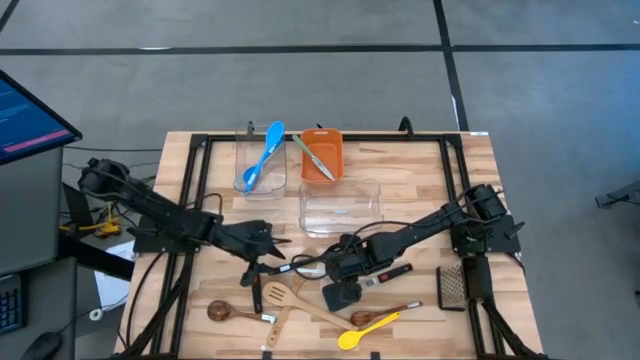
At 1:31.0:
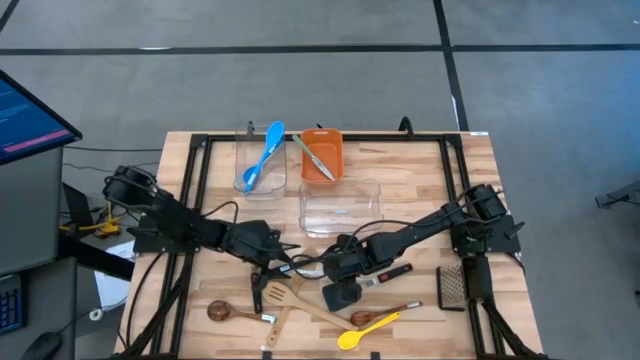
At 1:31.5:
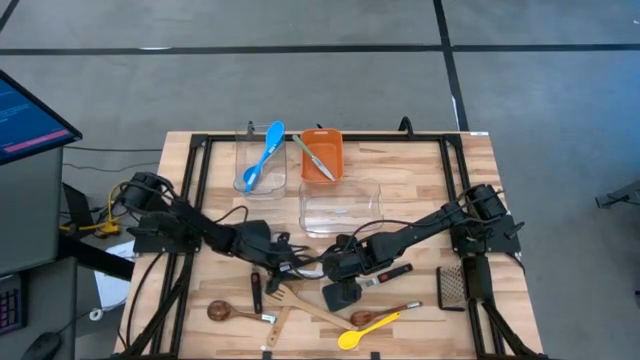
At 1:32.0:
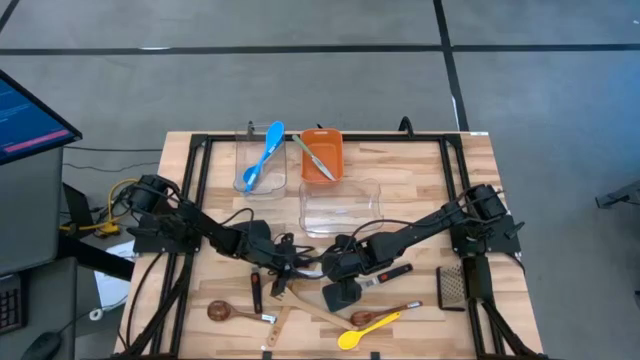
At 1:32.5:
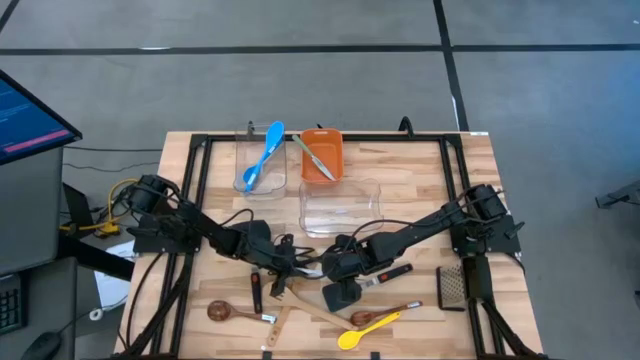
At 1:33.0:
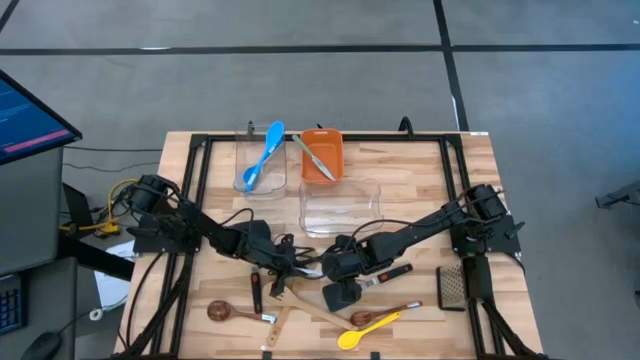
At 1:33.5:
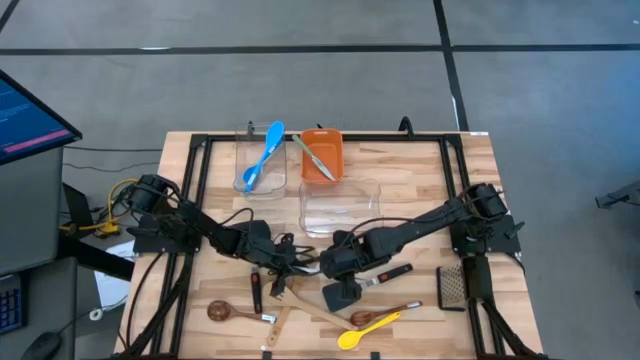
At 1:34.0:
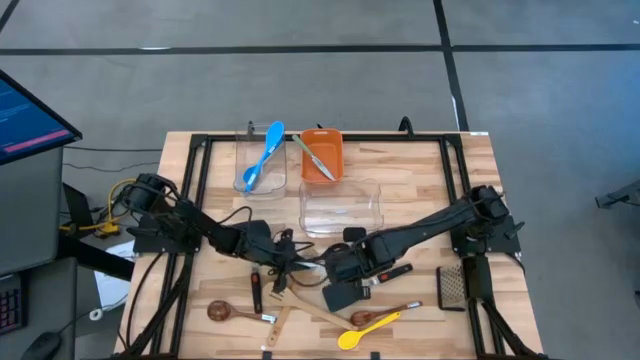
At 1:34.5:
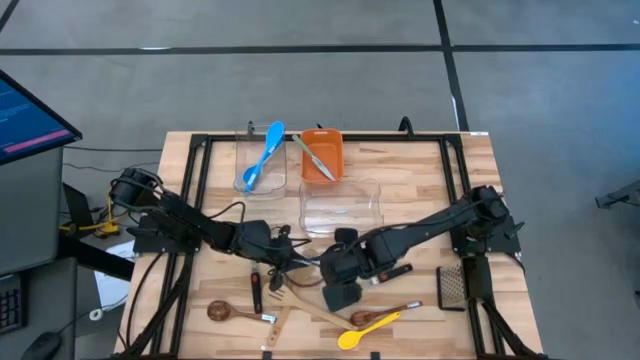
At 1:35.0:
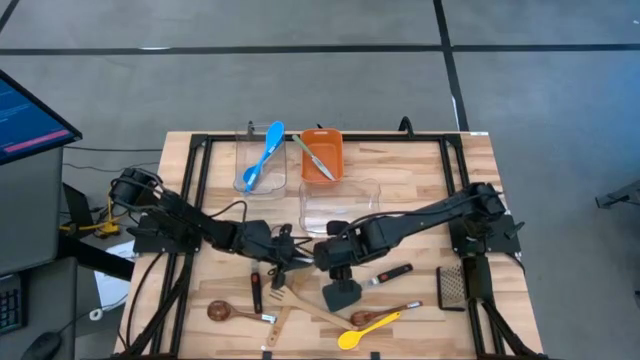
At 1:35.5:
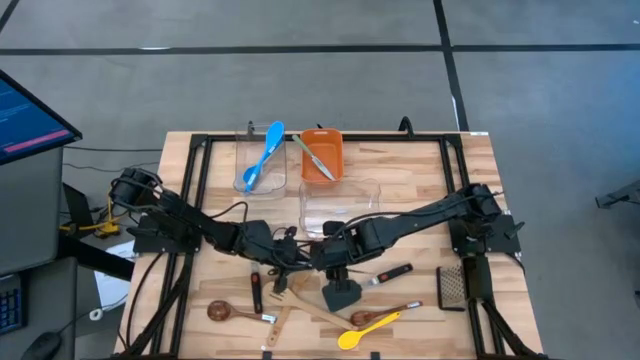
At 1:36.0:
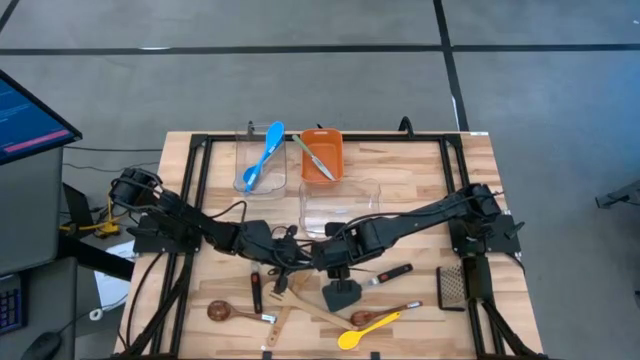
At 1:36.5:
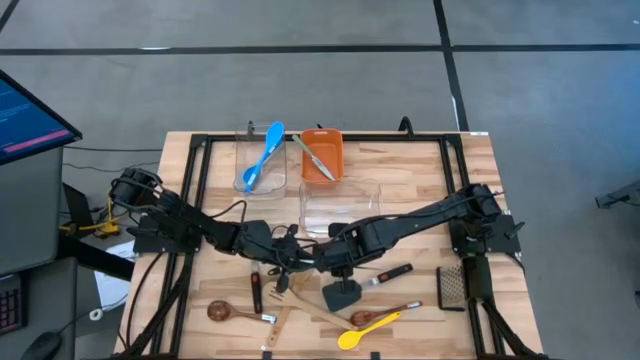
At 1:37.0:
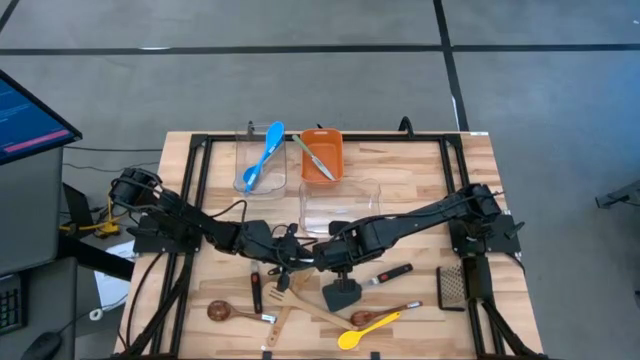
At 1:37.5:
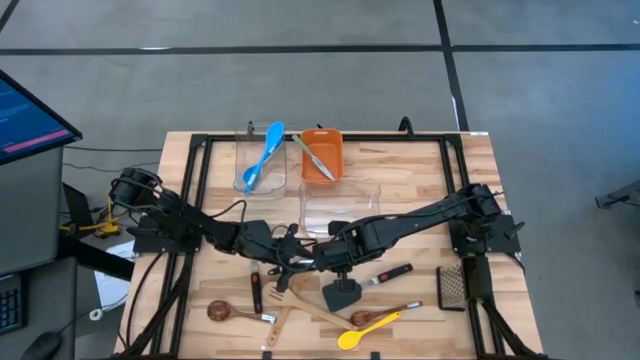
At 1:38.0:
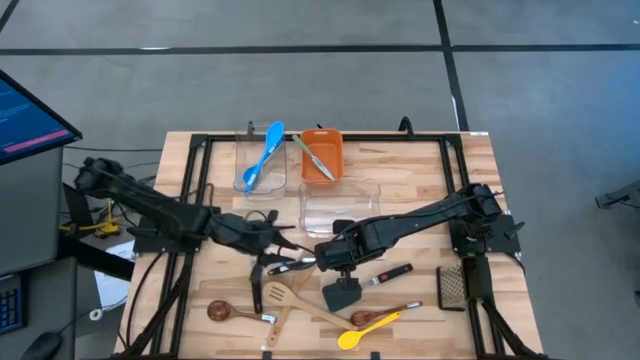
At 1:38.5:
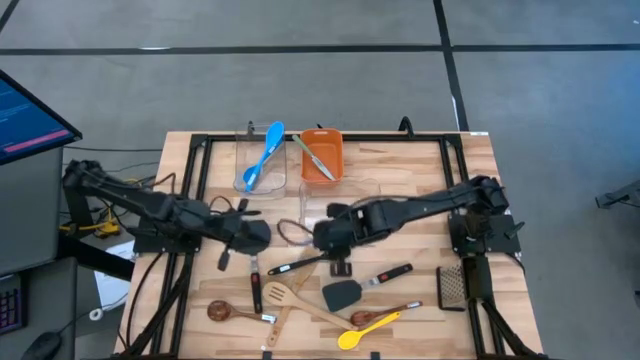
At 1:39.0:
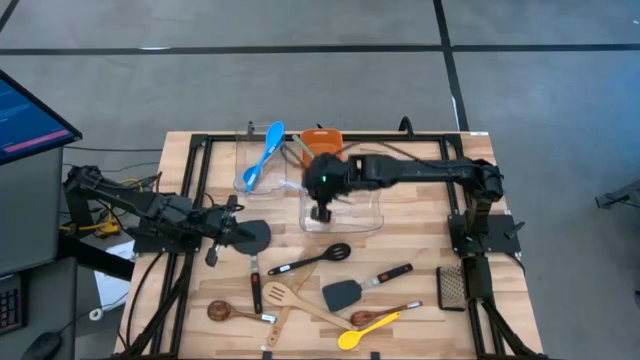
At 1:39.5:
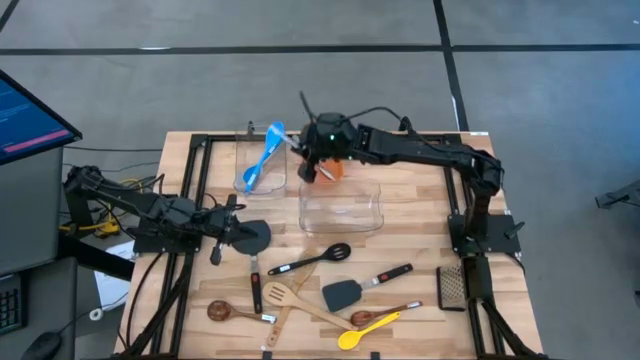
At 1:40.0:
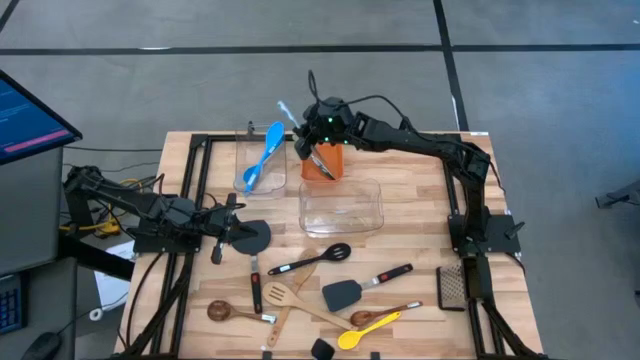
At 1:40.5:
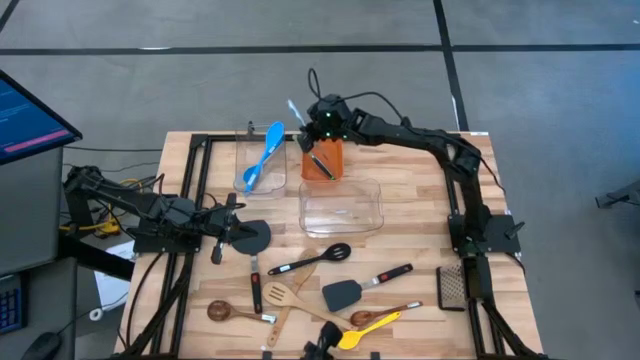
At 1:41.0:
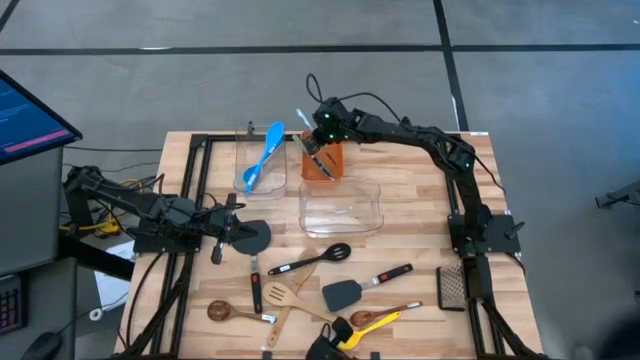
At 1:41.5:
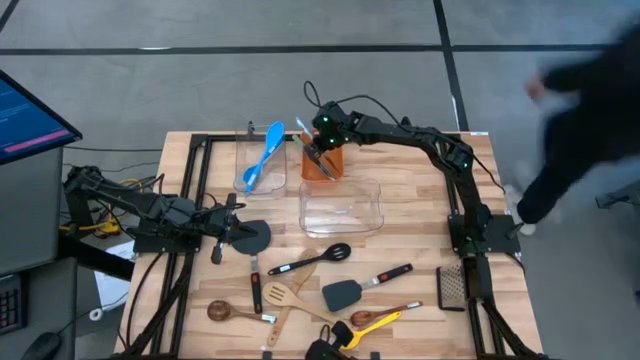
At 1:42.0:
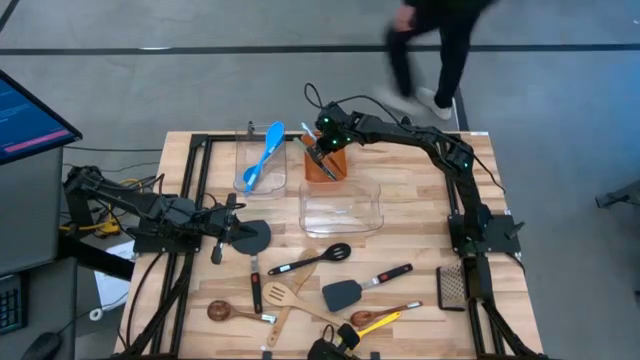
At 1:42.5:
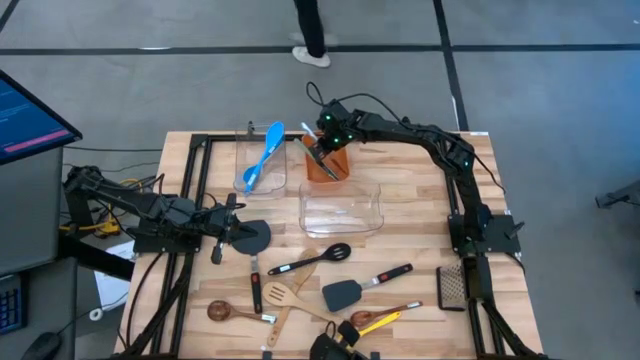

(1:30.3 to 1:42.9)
Task: Pick & Place Kitchen Items
Put the white table knife into the orange bin

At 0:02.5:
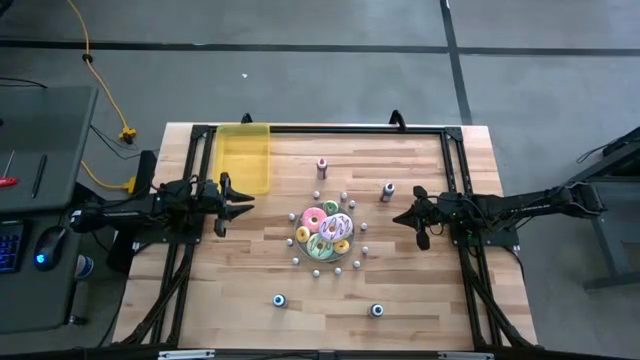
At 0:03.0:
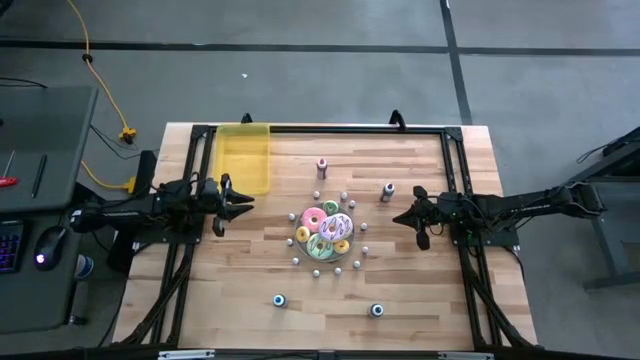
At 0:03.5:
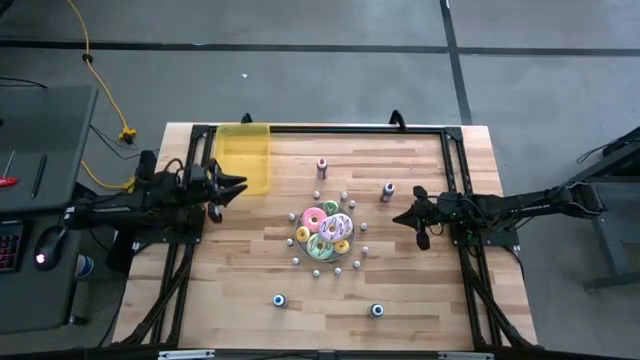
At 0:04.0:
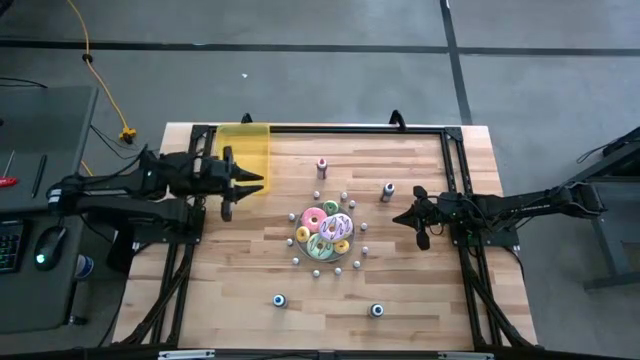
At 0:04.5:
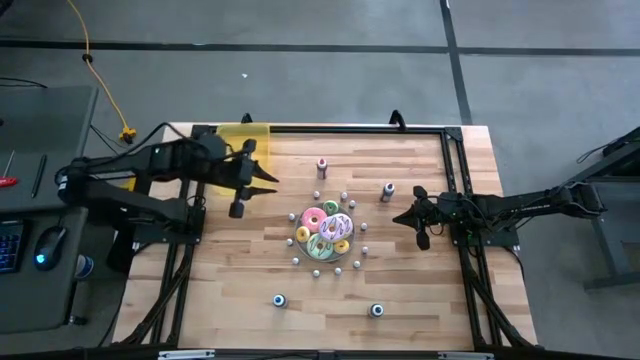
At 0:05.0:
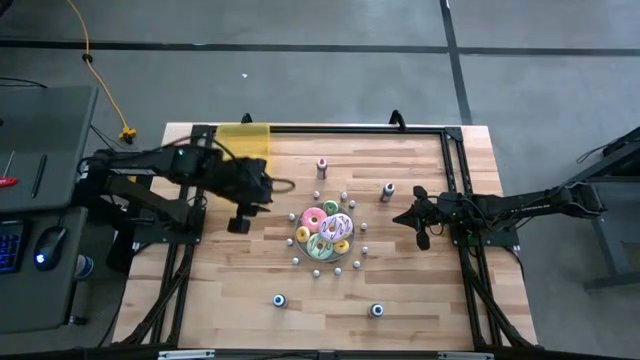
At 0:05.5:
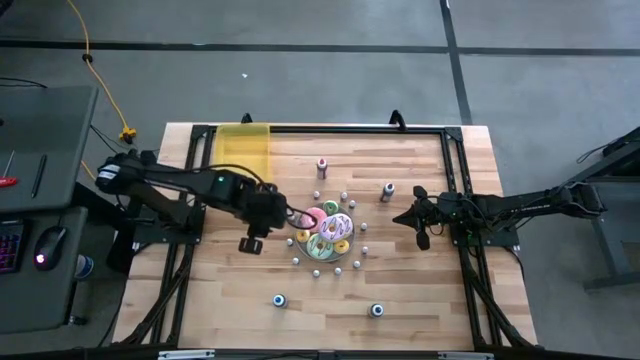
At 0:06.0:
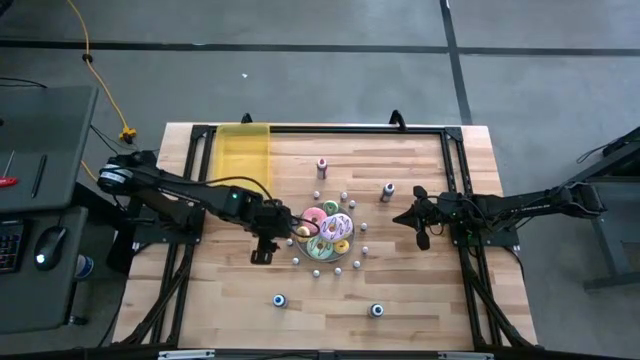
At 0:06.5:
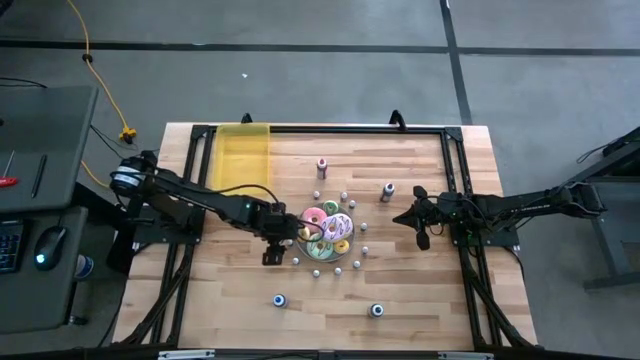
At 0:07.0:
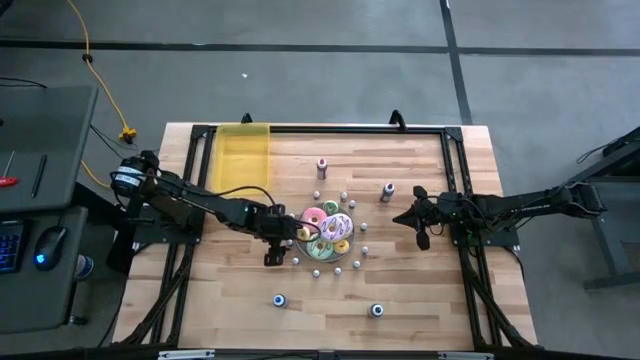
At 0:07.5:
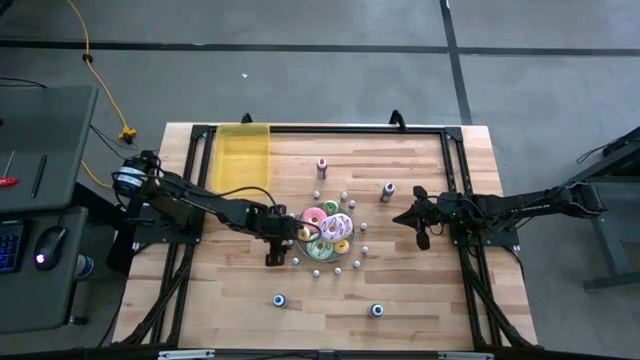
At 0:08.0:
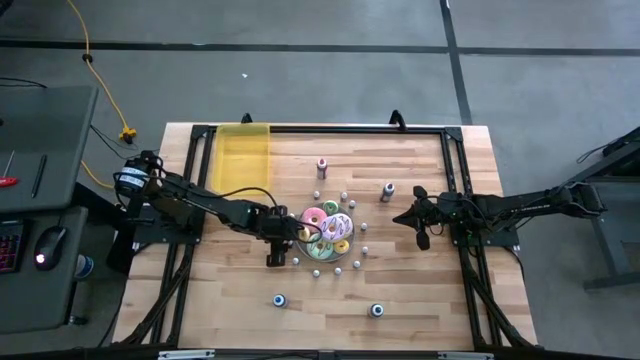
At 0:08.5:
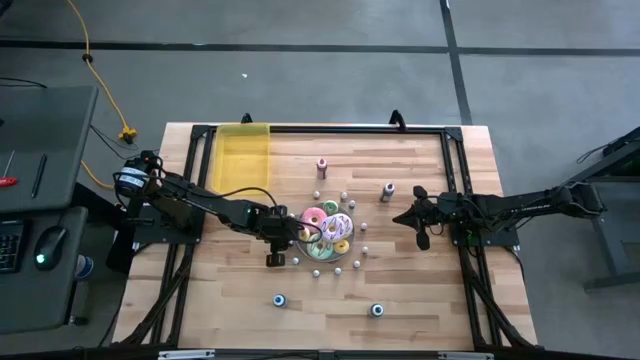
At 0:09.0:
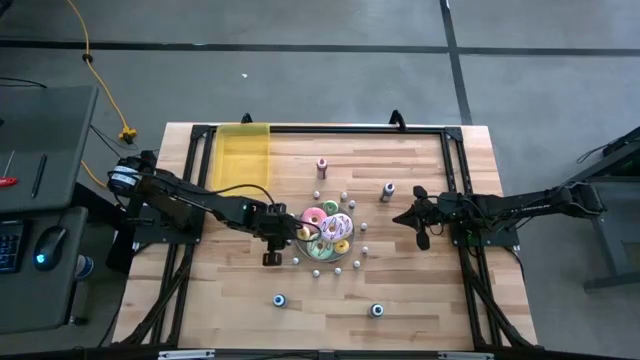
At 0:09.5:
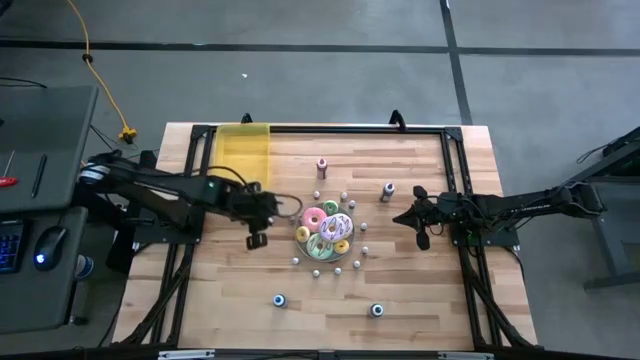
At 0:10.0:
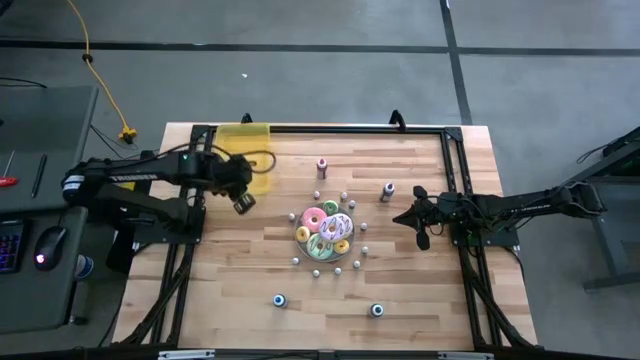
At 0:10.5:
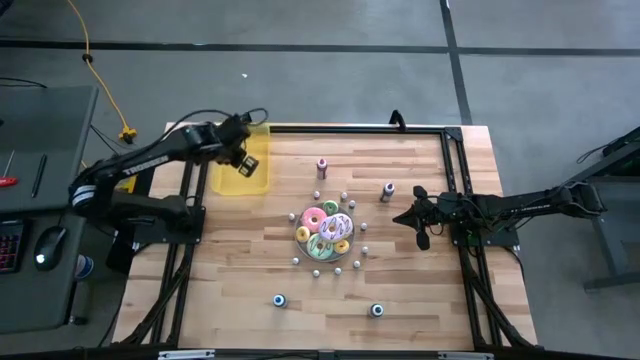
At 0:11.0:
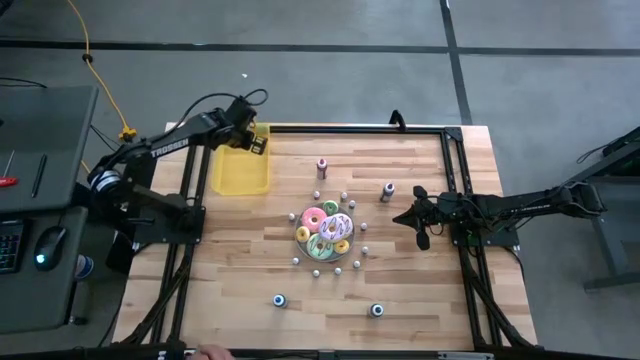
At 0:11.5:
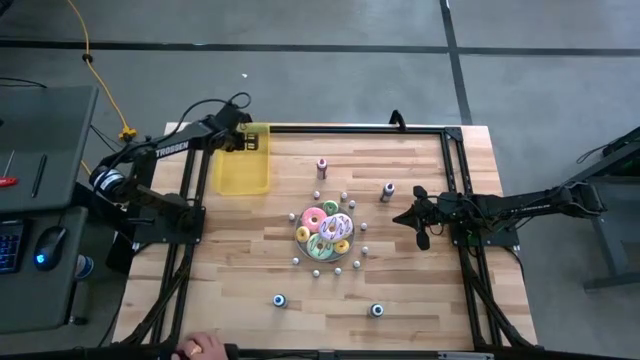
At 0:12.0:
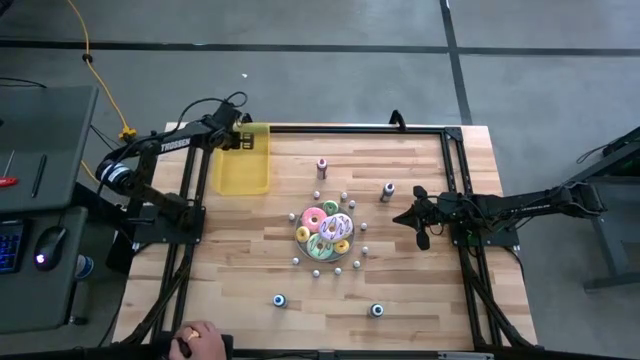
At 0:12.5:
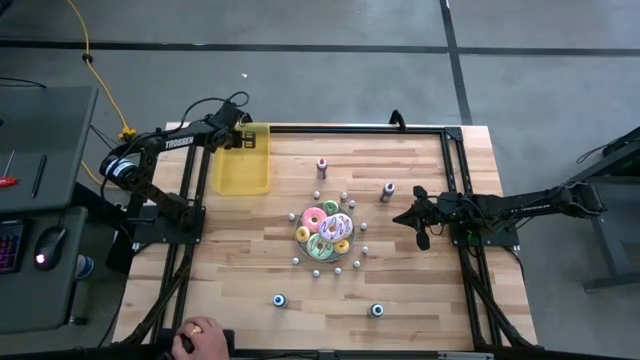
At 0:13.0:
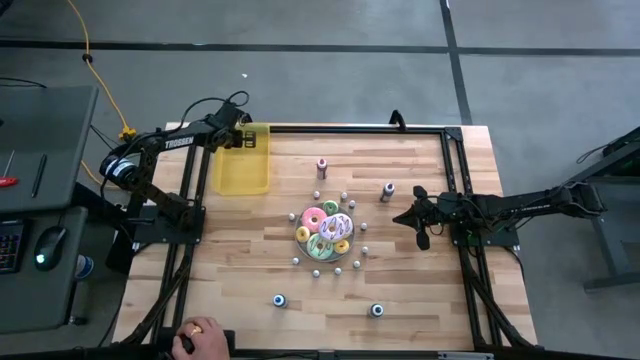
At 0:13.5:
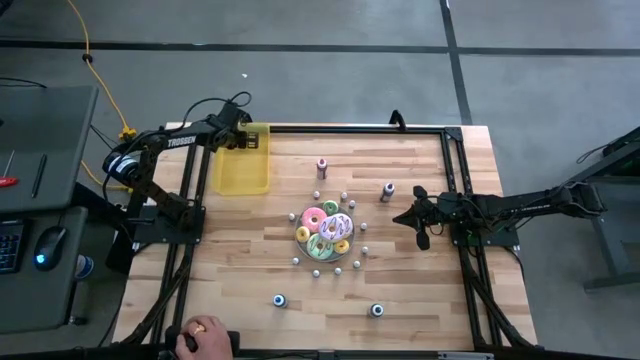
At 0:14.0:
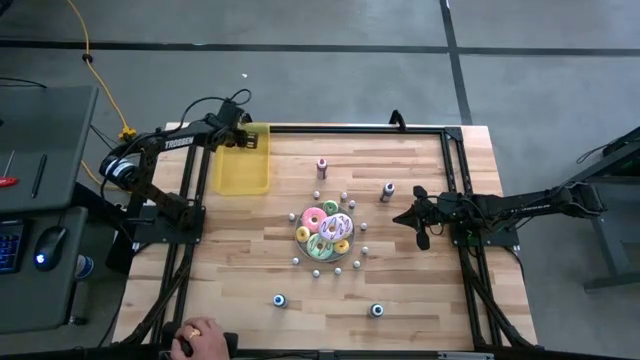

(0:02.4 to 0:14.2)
Task: Pick & Place food coloring
Put the small red food coloring bottle into the yellow bin
